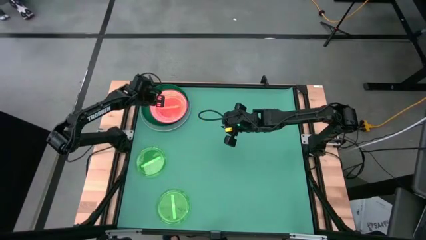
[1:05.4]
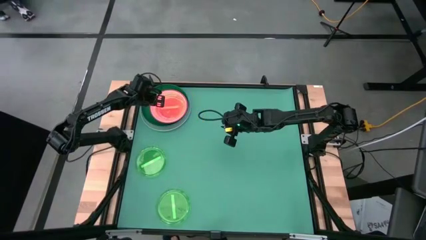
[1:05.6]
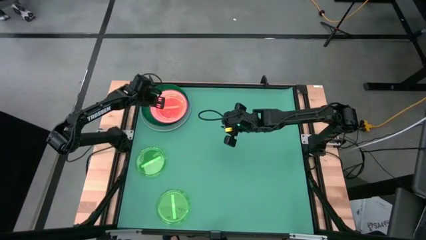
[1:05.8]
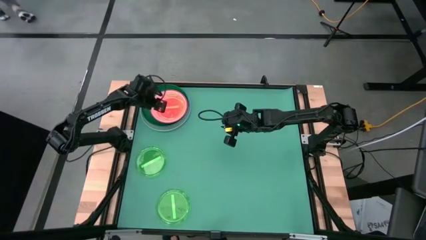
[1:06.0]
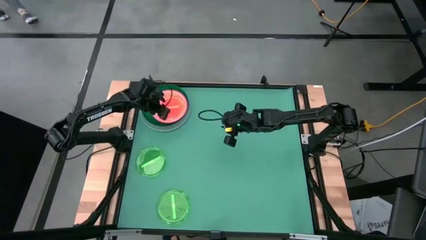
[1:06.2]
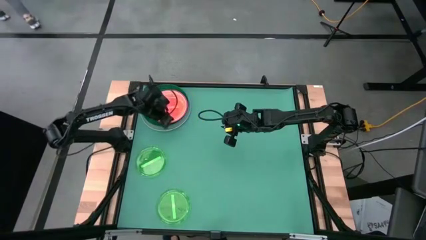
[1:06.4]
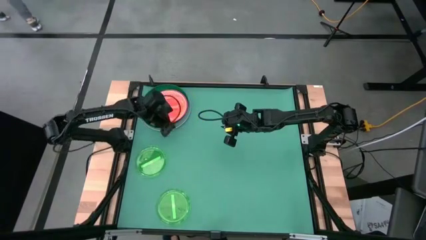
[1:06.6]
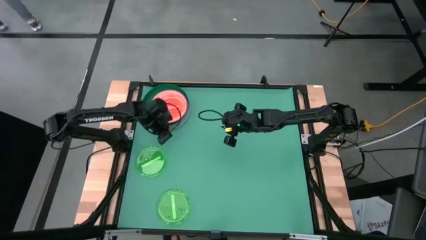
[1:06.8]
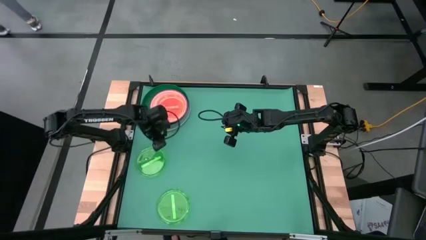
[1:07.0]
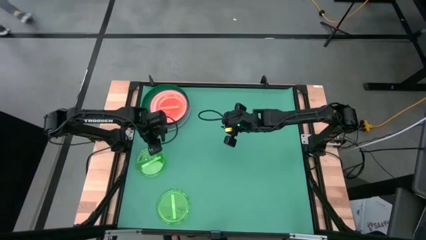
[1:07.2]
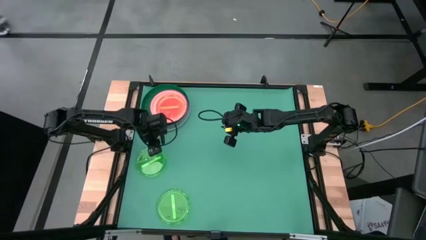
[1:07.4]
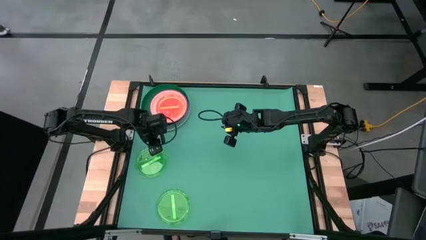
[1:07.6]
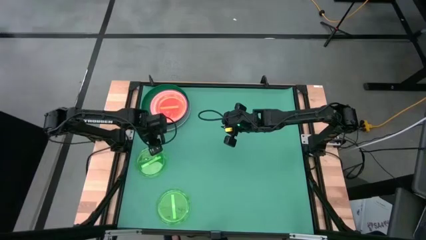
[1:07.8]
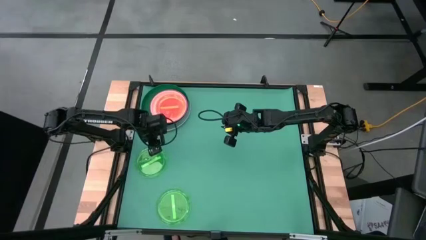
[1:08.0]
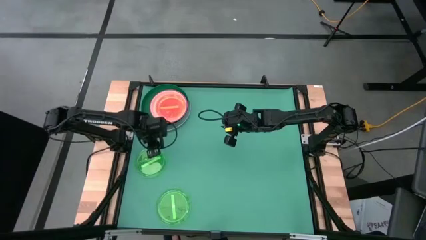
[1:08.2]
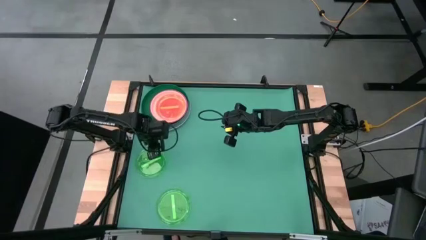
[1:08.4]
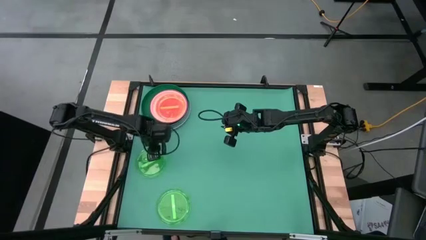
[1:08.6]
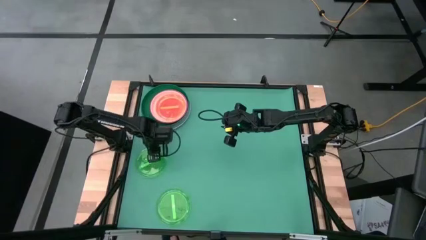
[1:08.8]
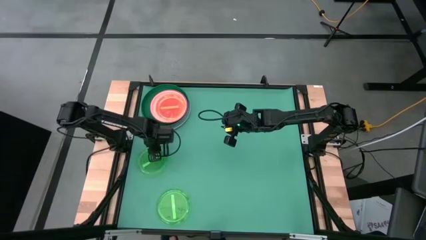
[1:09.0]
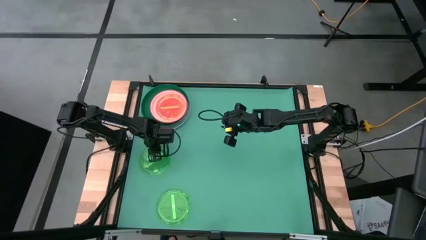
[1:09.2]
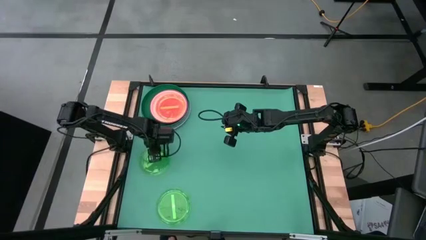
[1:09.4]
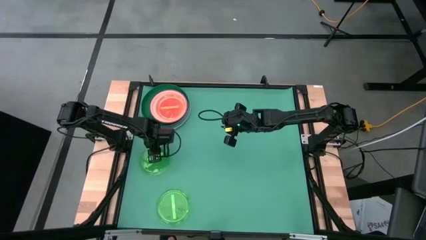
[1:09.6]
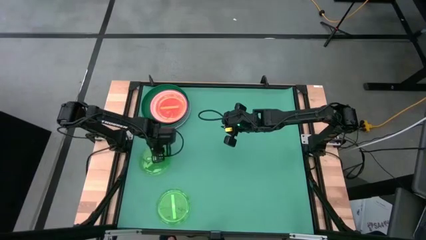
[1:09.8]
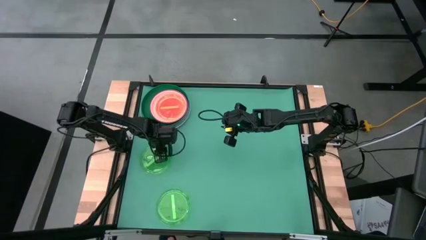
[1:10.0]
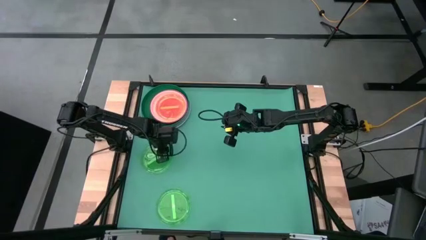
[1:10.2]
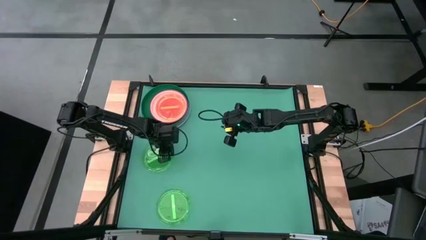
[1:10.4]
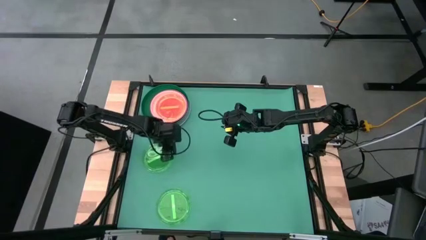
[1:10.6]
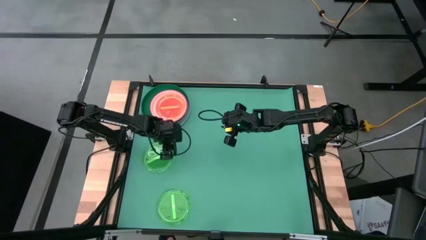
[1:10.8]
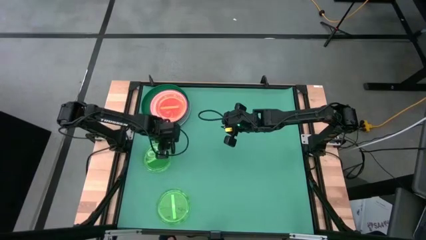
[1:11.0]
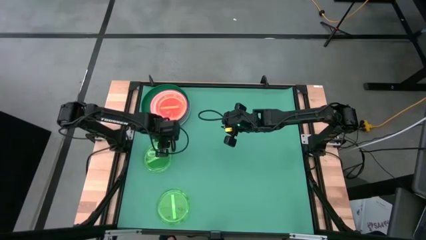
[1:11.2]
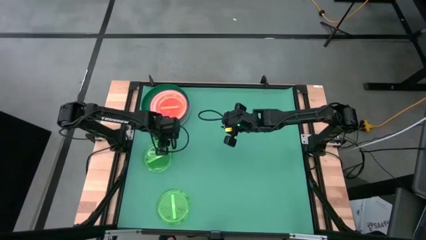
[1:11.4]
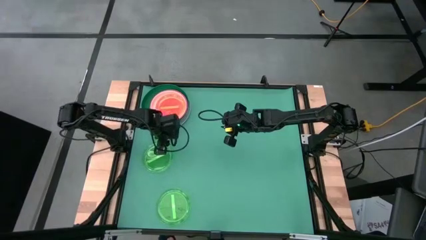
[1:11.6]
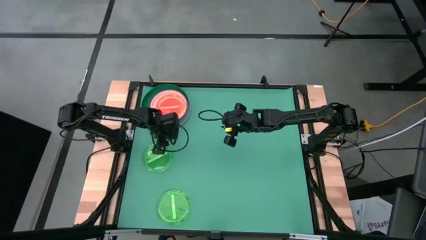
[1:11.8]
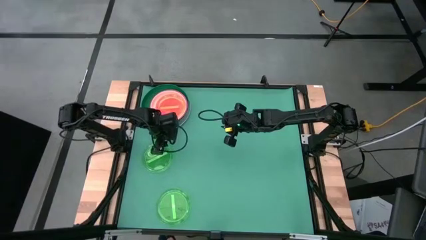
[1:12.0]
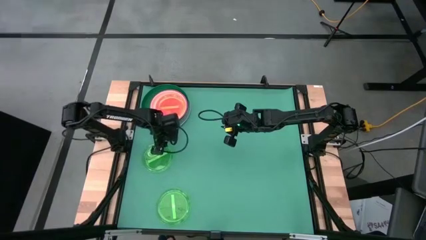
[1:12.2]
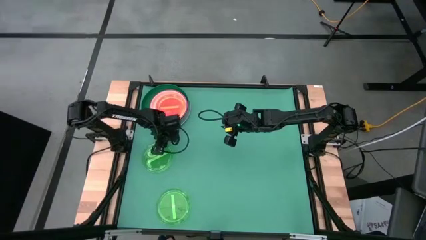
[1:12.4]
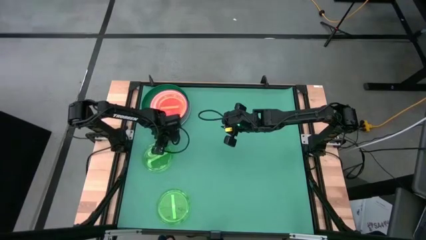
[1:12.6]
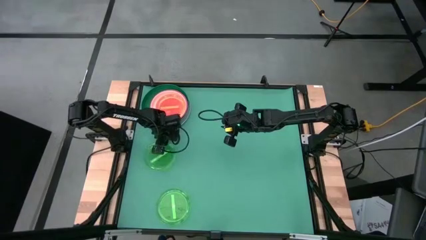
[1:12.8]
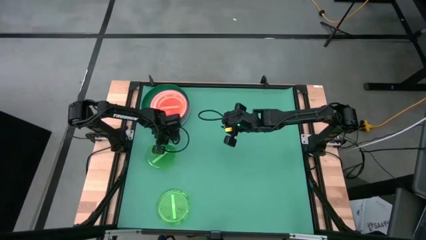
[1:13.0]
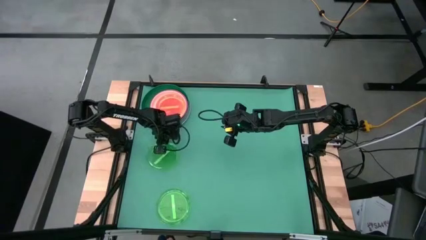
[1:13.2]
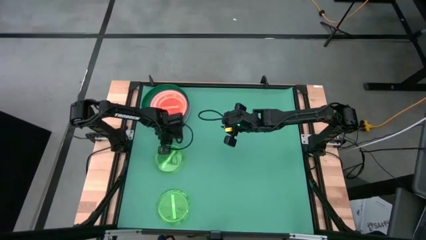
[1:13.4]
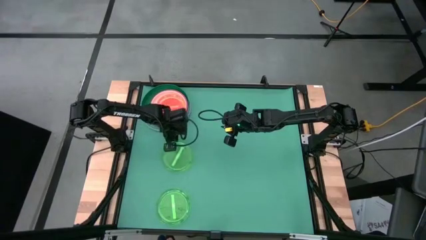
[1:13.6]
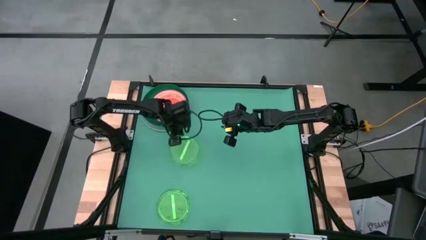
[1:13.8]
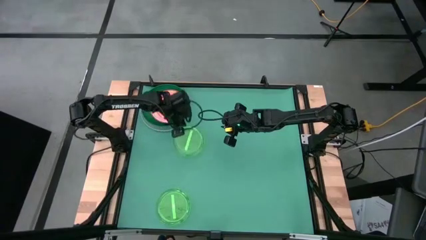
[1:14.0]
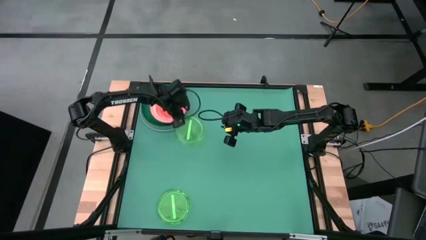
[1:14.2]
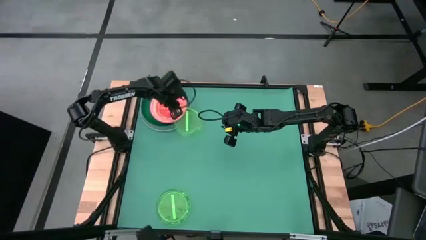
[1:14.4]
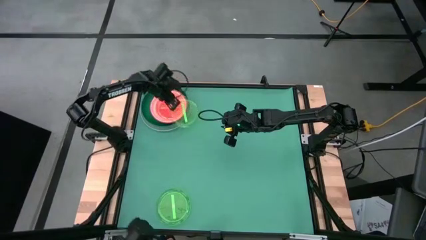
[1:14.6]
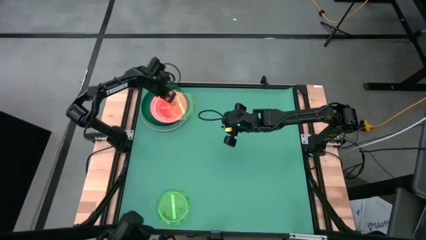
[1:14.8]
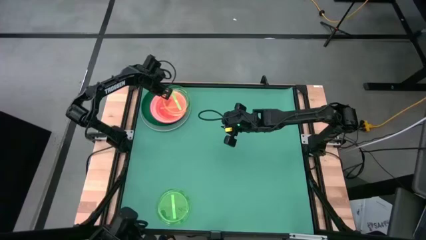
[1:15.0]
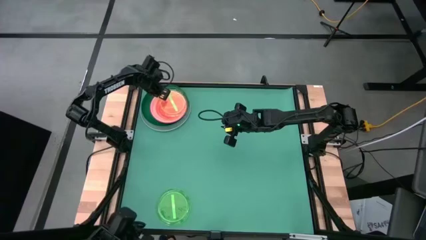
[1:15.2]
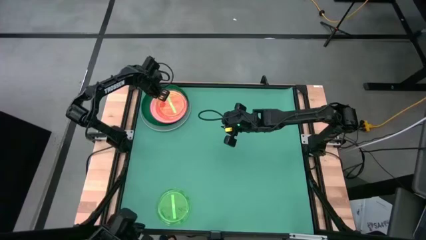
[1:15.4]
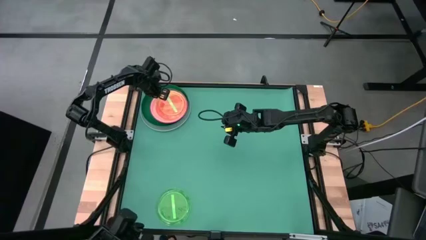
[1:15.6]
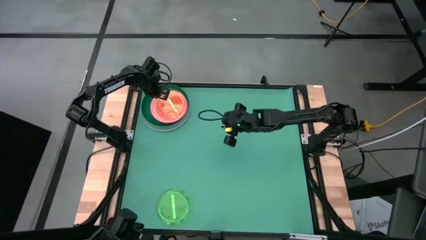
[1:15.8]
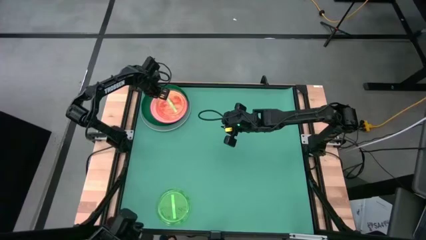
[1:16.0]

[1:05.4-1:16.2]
Task: Stack plastic plates
Stack the top green plate on top of the orange plate

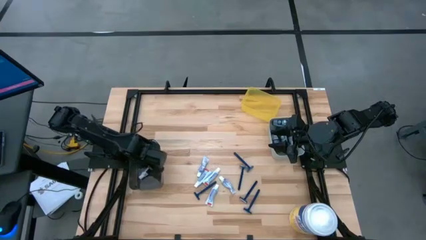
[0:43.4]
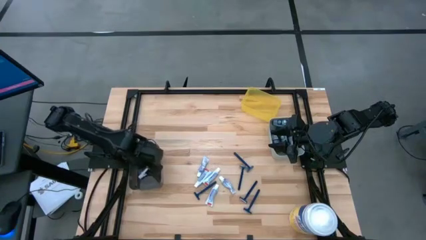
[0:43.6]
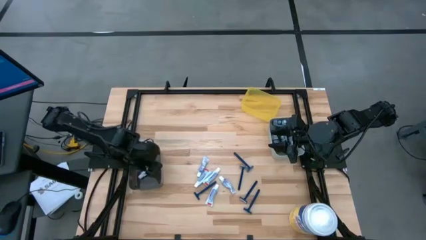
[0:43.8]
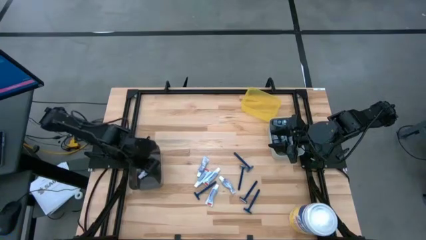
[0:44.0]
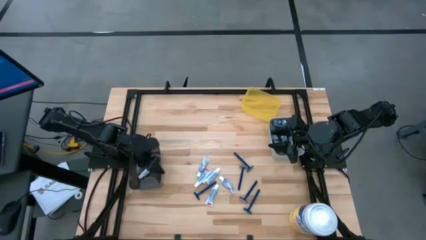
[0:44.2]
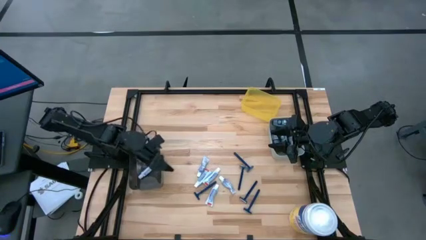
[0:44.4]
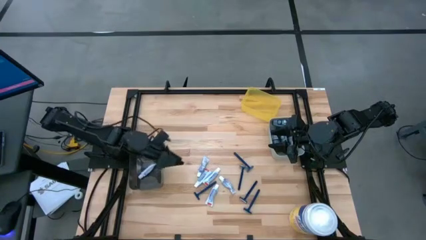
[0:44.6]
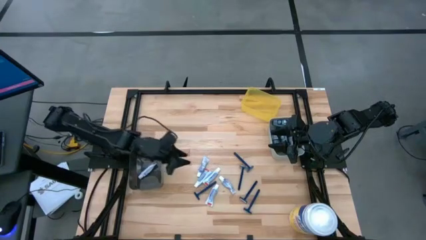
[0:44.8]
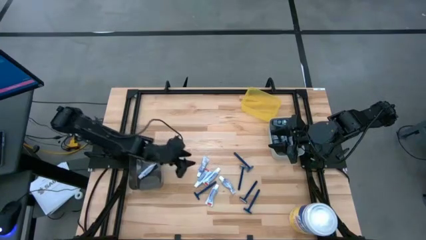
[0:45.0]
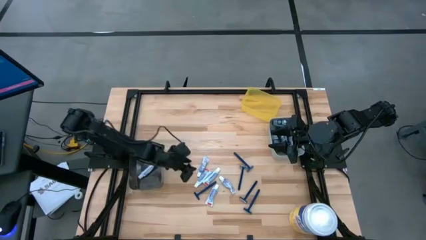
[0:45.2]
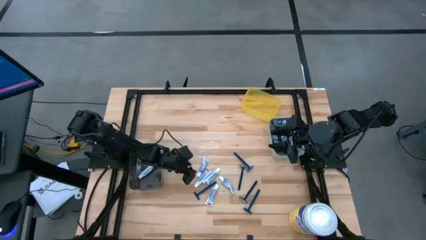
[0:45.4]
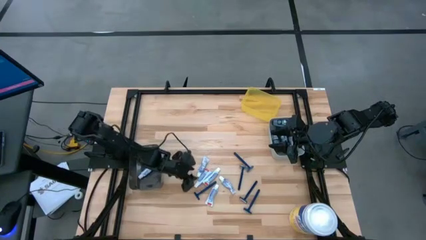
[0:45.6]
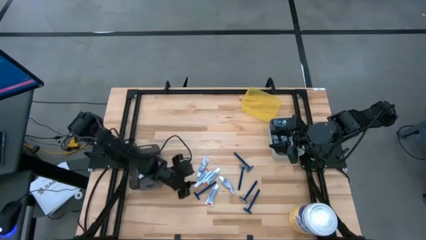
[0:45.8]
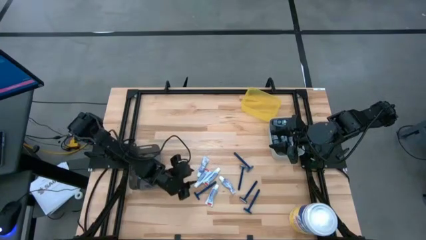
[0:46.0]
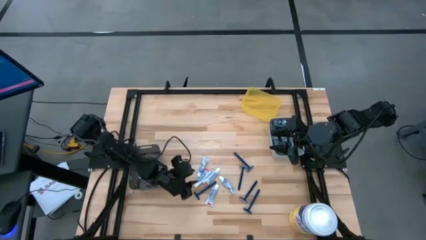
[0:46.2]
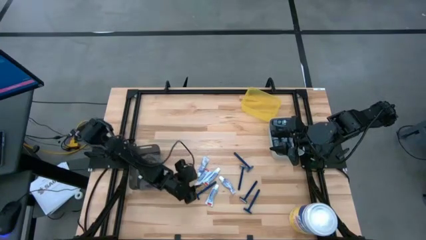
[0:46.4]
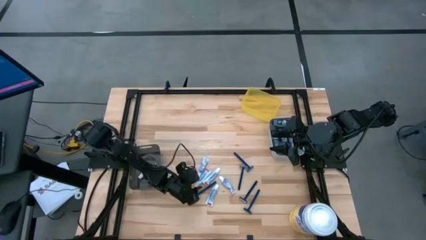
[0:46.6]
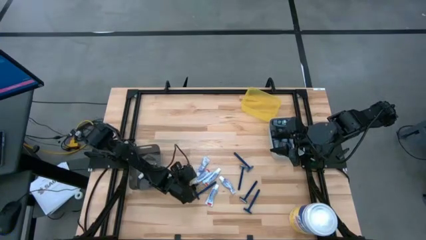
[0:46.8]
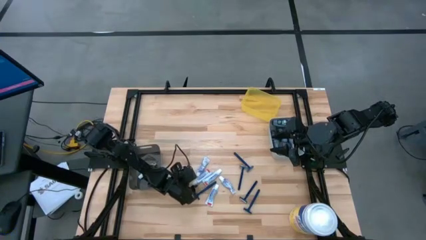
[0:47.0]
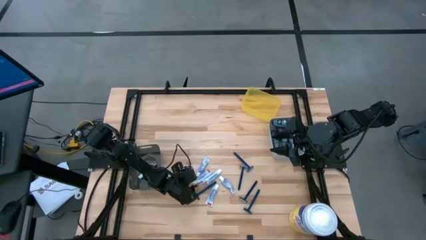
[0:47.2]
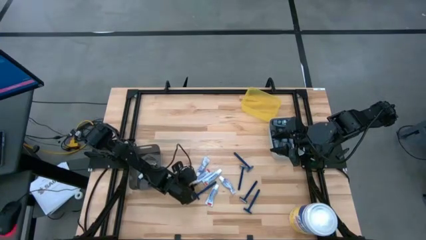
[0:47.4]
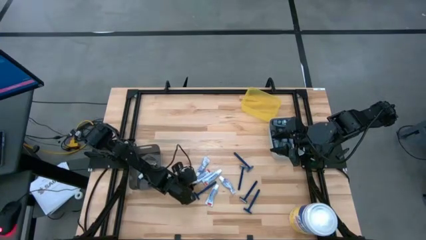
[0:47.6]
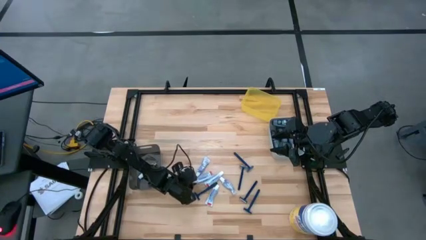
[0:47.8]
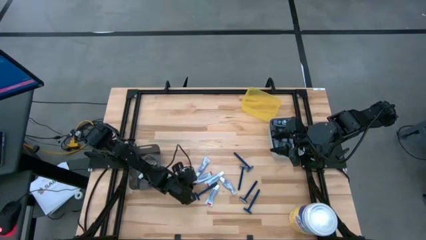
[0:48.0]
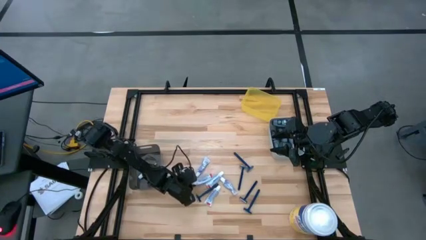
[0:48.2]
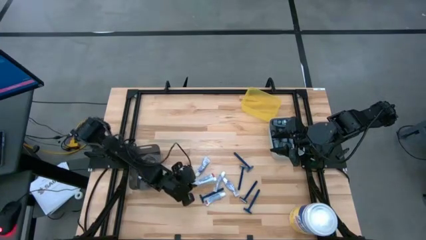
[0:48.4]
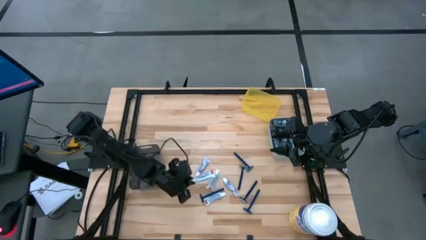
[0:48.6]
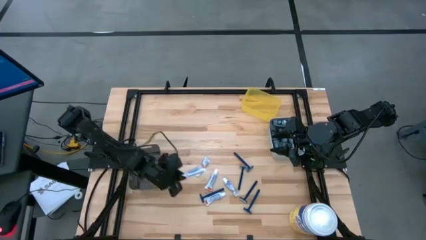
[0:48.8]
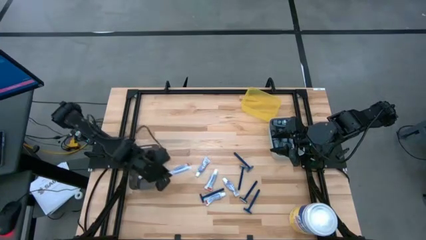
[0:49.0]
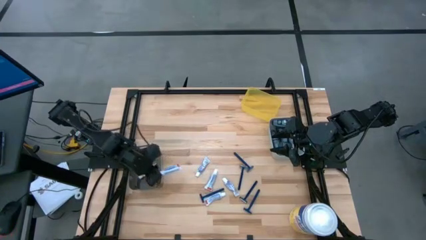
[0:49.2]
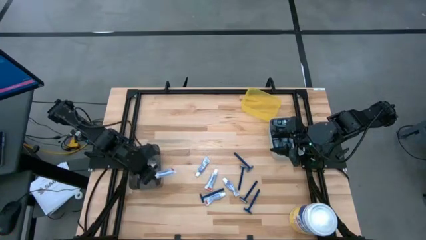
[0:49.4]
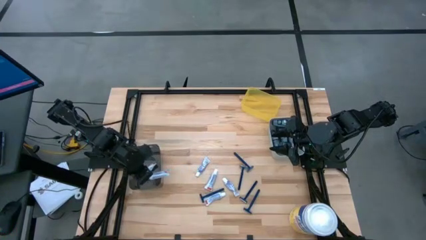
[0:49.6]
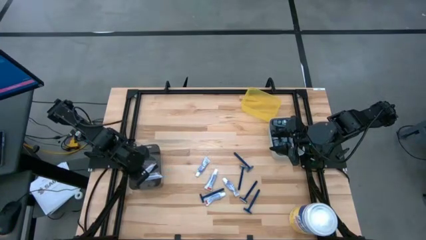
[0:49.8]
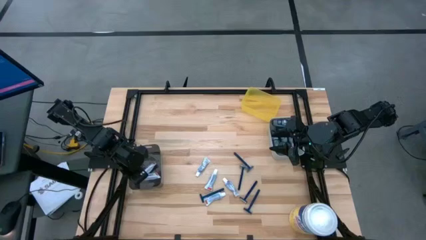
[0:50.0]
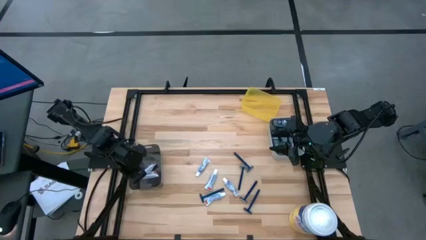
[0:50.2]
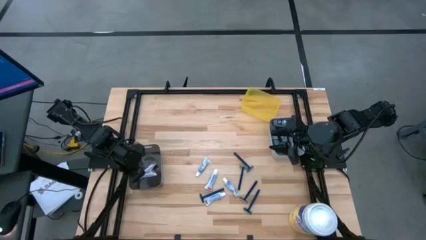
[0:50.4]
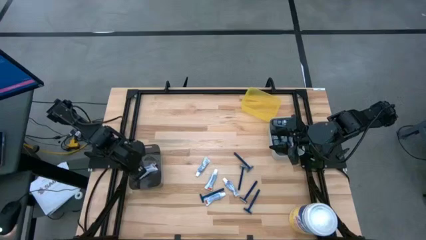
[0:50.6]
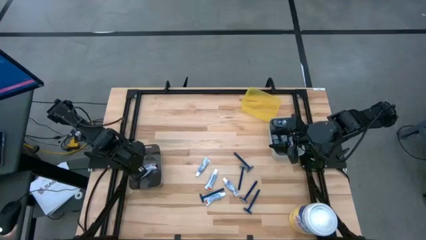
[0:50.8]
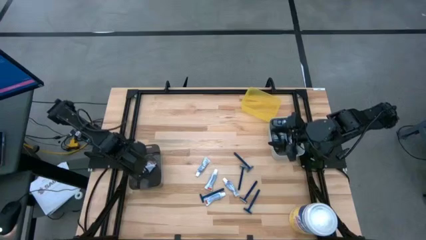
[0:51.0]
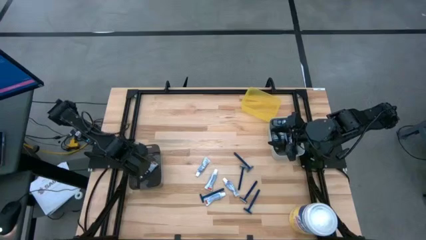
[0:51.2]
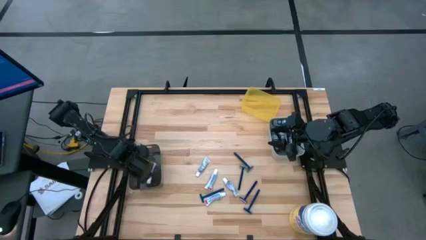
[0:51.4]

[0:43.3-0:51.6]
Task: Pick & Place Travel size toiletries
Put the white toothpaste into the black bin
